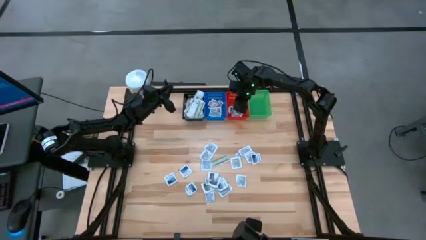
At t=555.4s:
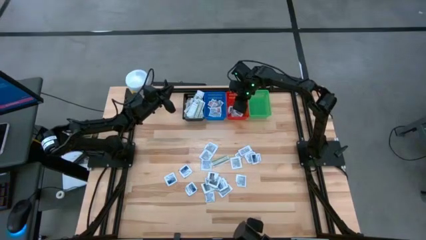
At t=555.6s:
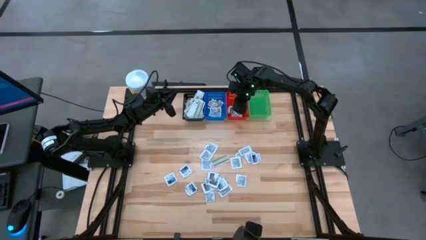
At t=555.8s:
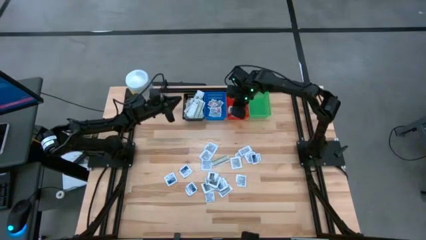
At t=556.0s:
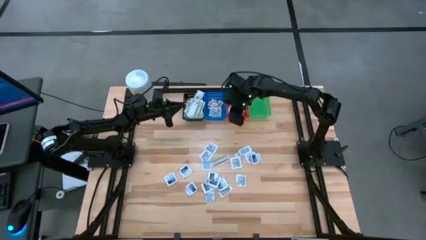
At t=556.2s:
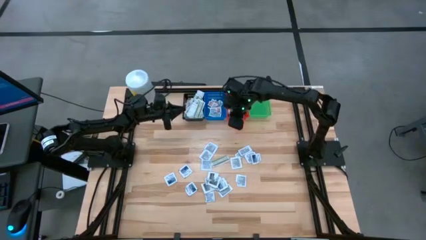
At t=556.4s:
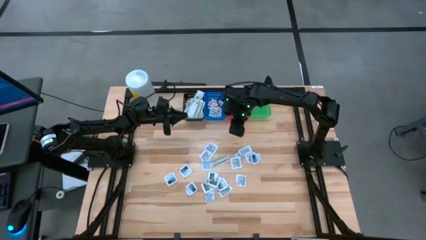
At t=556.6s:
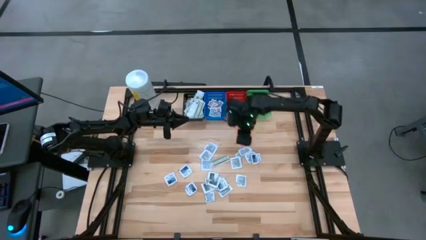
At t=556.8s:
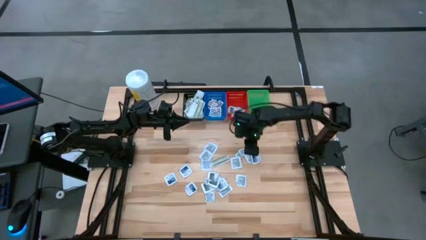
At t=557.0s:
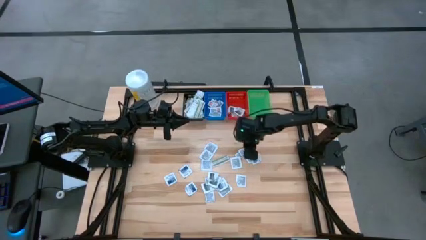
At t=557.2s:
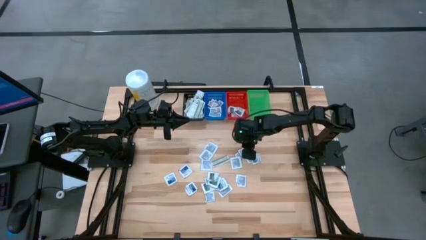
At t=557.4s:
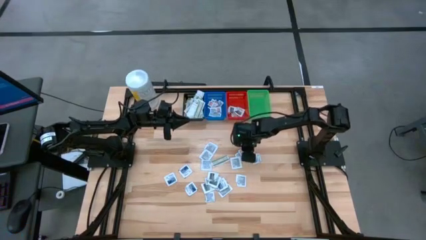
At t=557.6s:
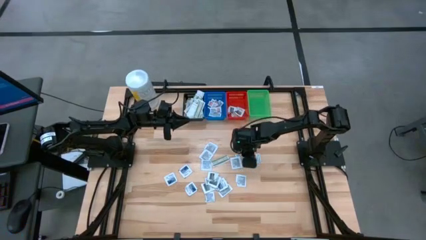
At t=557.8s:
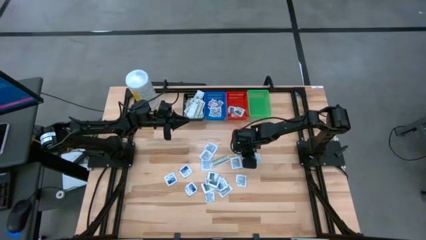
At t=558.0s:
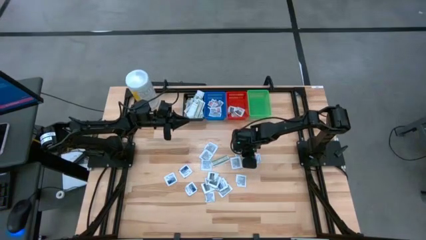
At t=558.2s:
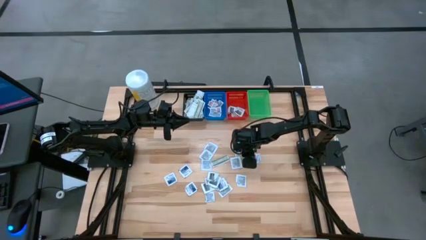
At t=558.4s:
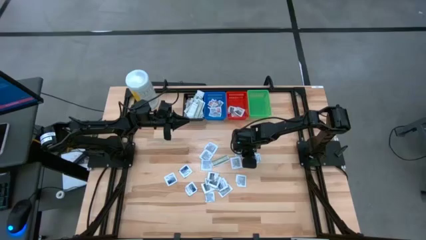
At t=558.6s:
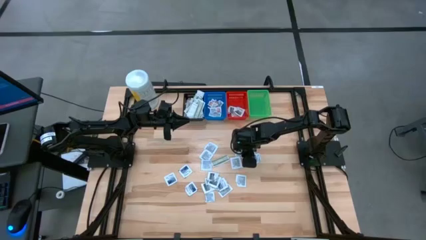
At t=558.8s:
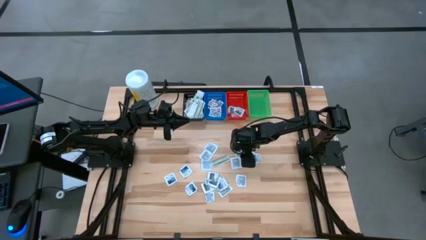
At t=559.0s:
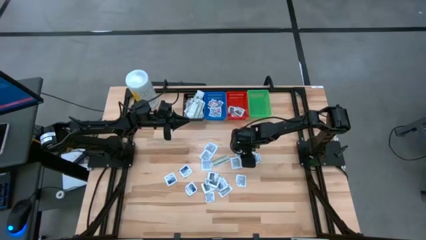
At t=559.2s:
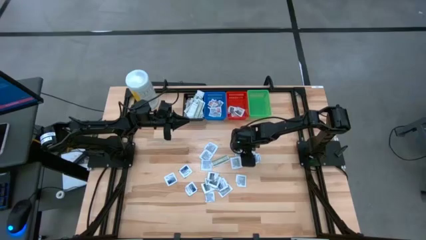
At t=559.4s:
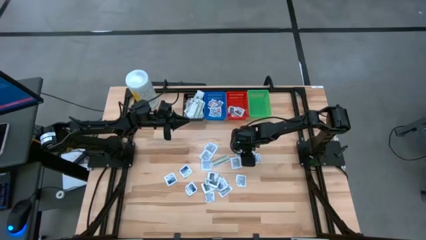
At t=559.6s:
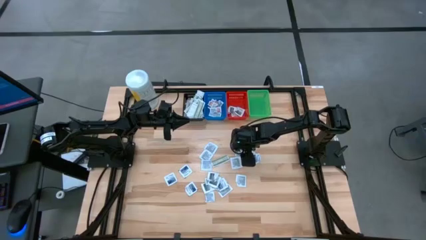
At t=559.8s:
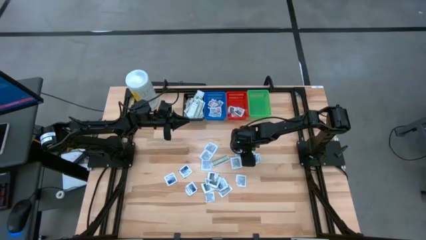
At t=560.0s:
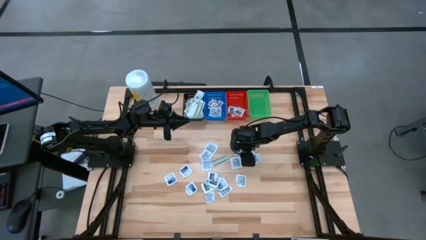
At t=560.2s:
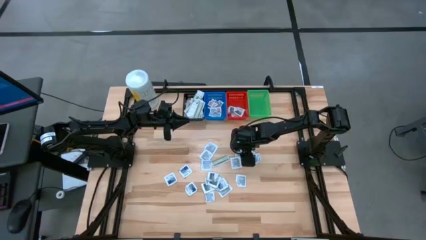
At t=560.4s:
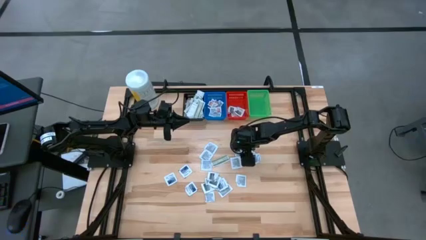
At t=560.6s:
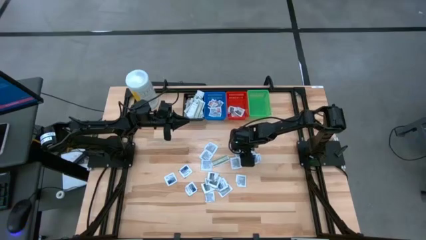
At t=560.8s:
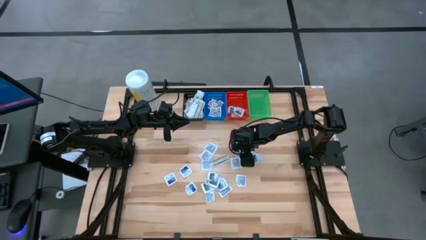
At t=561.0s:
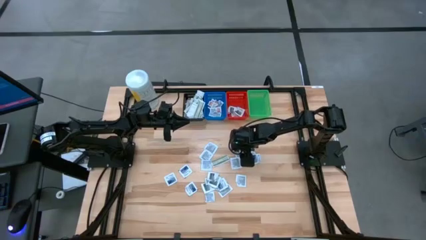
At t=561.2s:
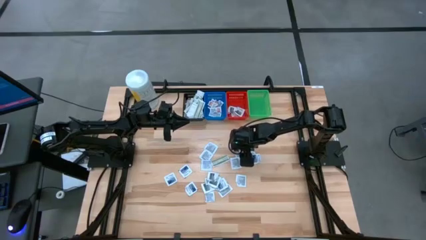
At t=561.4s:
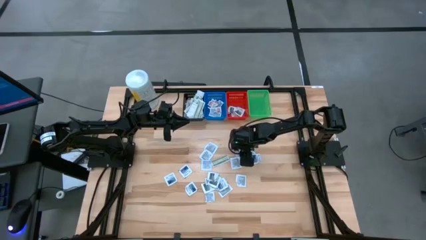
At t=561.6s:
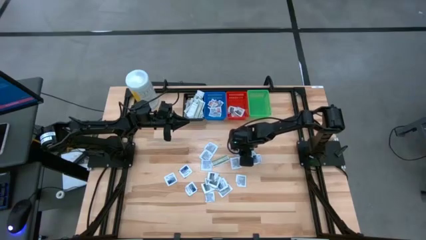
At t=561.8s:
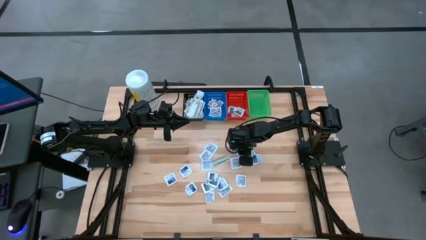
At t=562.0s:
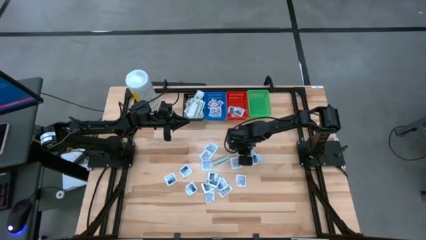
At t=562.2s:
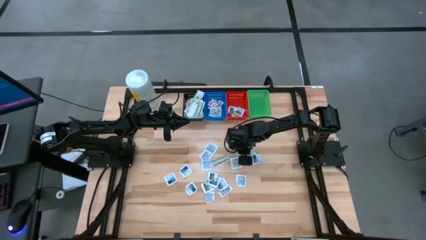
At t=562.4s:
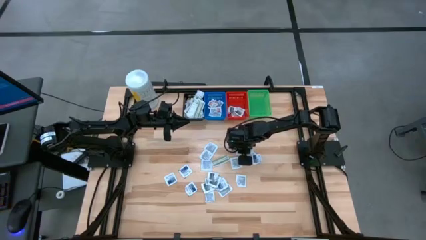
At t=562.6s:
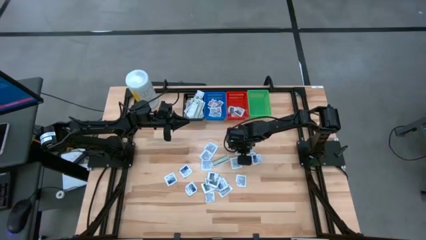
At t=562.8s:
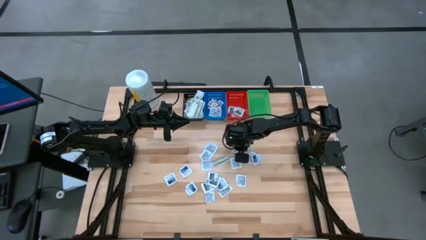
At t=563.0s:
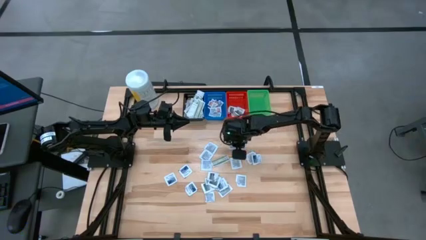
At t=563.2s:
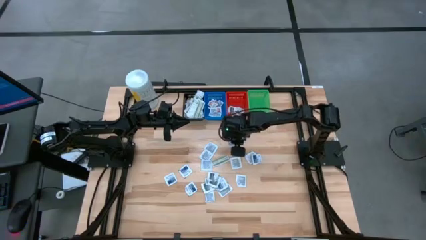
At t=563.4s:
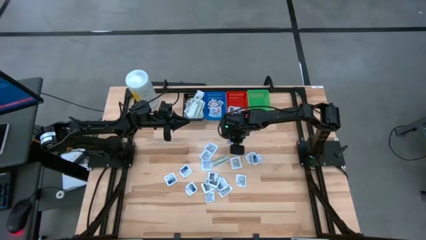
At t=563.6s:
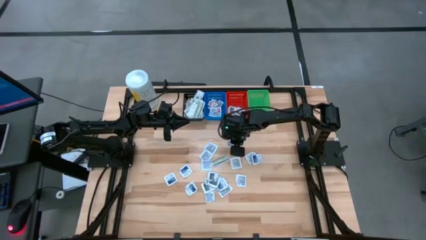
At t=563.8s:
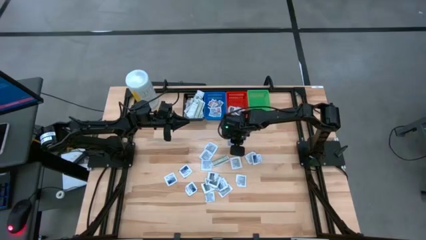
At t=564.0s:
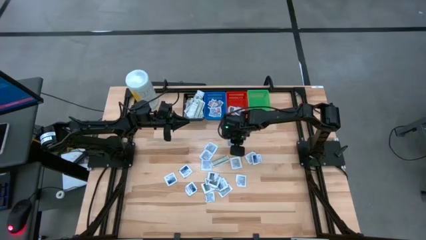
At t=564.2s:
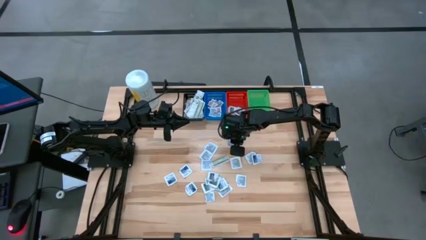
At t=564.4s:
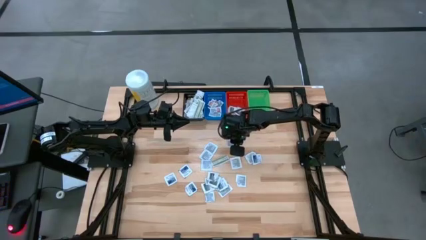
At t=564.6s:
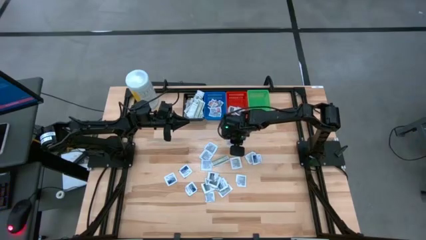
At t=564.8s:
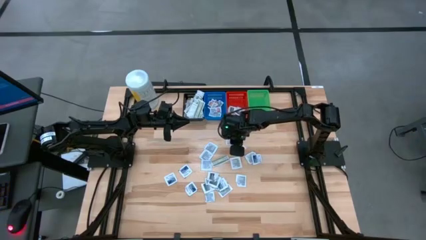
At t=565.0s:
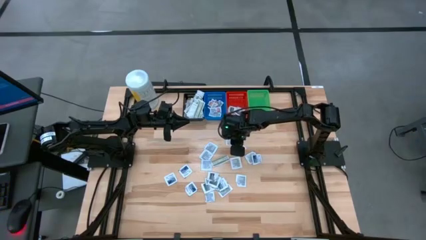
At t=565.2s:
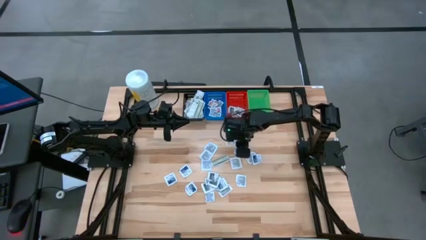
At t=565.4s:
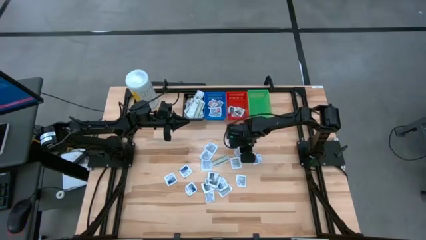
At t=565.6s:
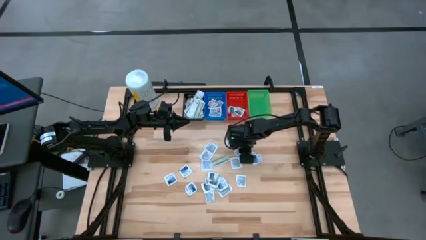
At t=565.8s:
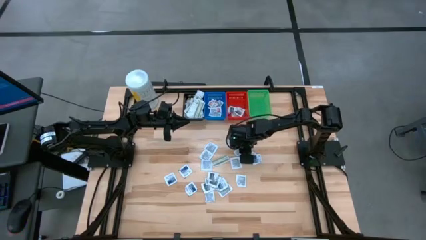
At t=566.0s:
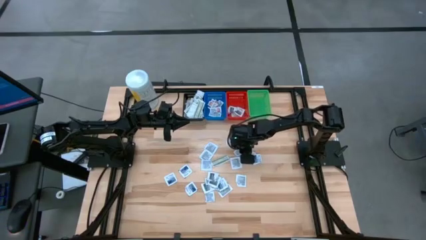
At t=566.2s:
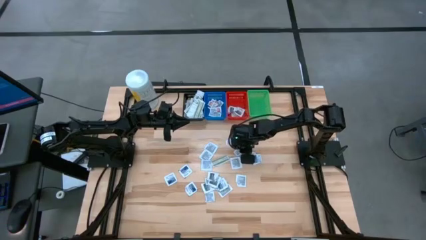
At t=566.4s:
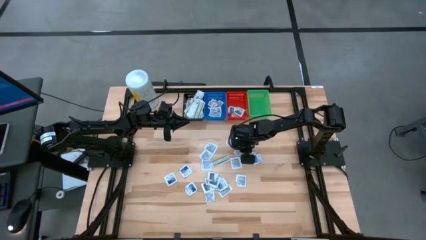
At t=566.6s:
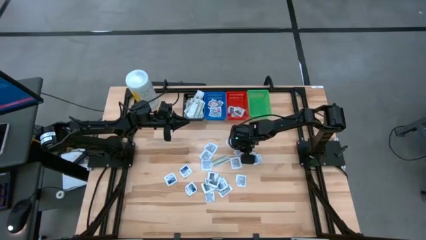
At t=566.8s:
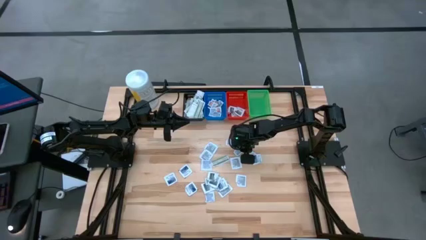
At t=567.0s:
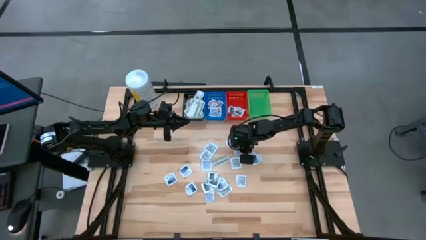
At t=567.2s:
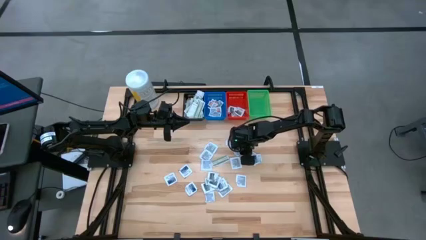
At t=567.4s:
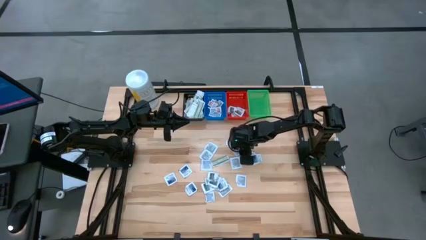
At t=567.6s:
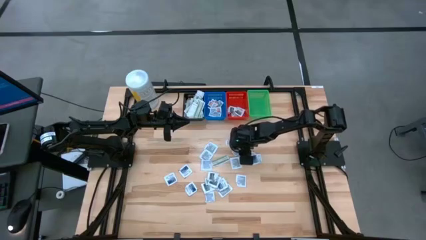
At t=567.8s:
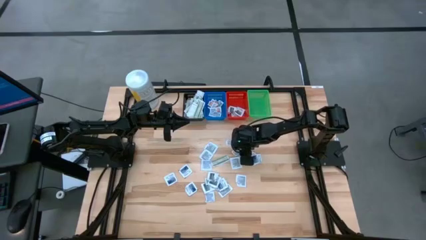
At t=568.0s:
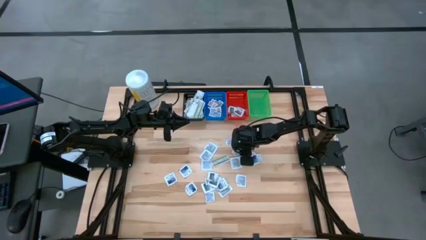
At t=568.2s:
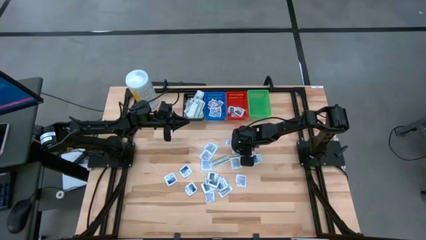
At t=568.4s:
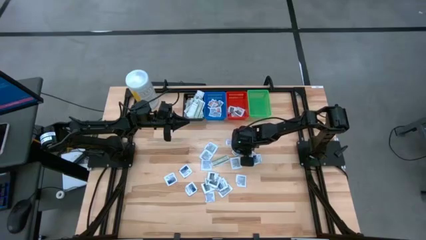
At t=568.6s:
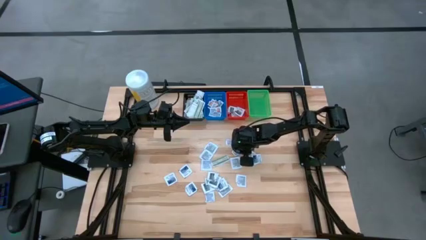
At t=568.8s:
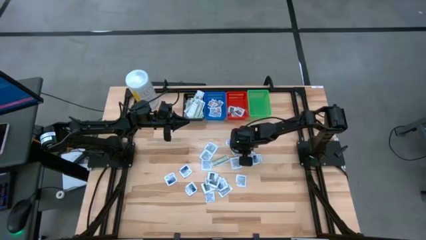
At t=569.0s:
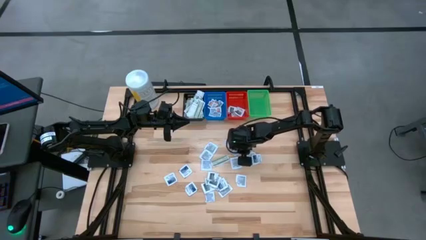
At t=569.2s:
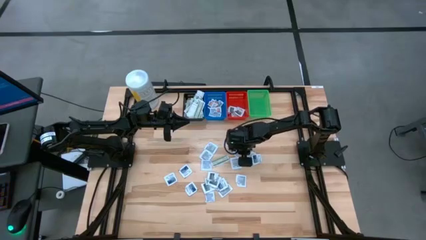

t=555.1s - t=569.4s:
Task: Pick & Place First Aid Supplies
Put the orange ointment pack in the blue bin
